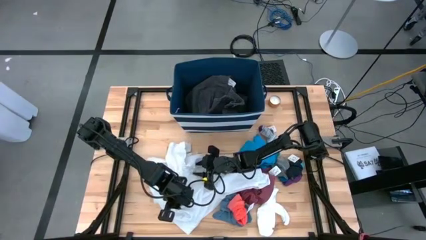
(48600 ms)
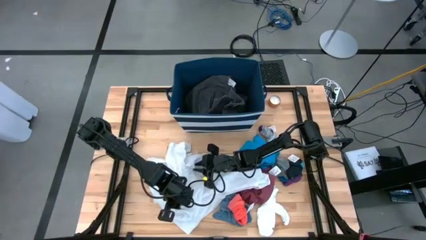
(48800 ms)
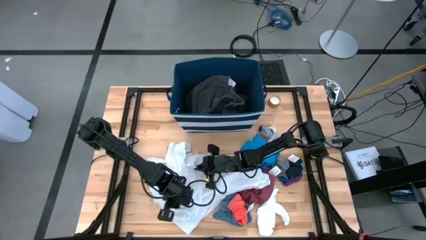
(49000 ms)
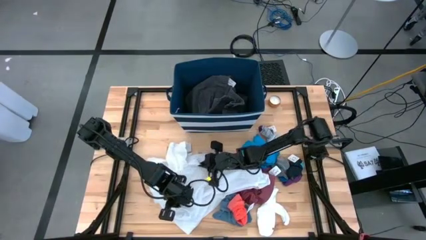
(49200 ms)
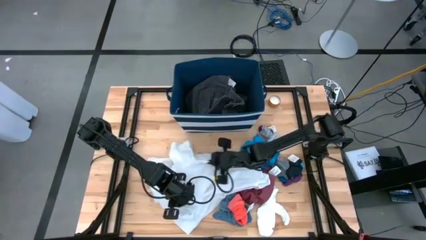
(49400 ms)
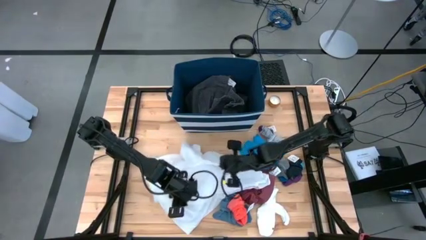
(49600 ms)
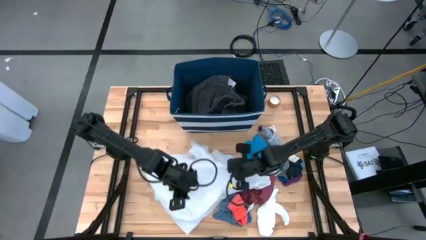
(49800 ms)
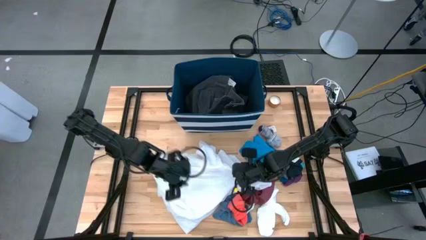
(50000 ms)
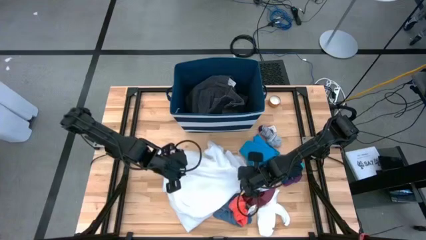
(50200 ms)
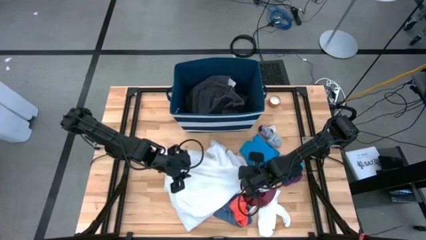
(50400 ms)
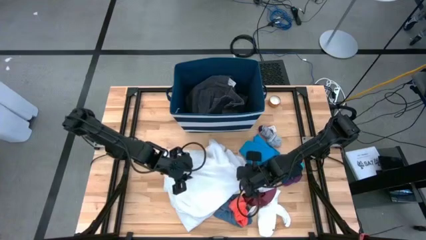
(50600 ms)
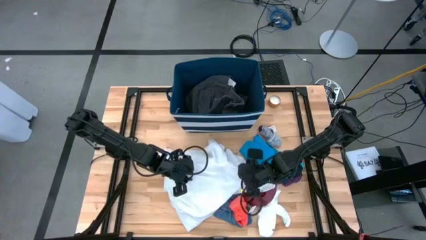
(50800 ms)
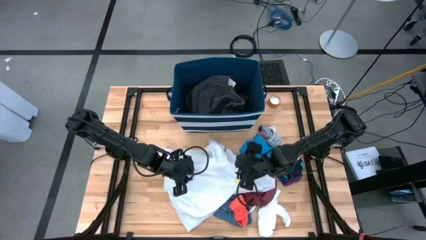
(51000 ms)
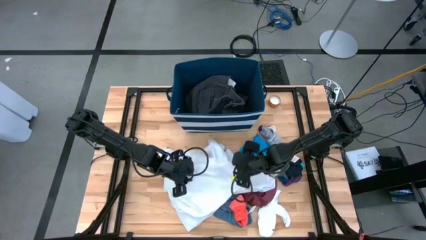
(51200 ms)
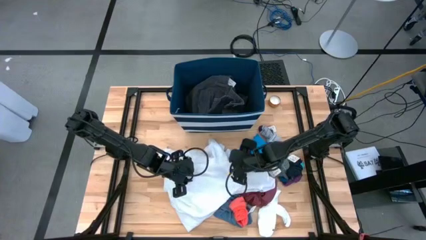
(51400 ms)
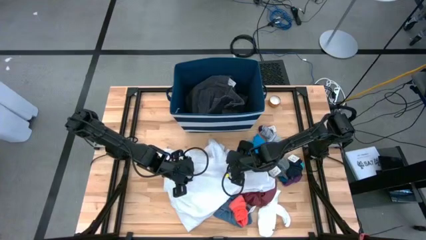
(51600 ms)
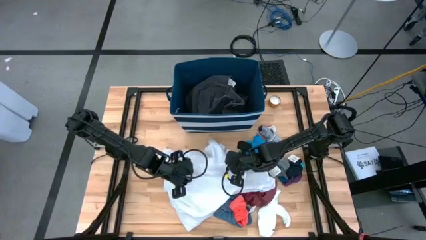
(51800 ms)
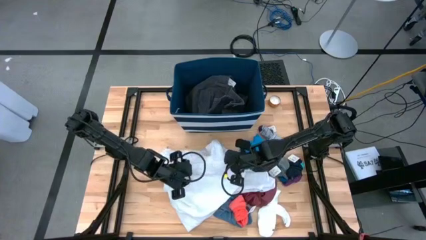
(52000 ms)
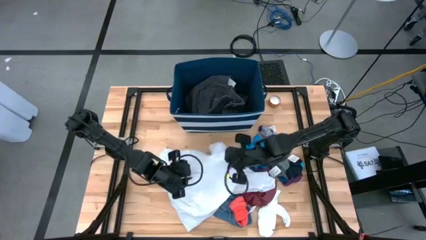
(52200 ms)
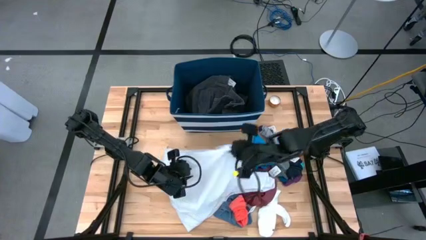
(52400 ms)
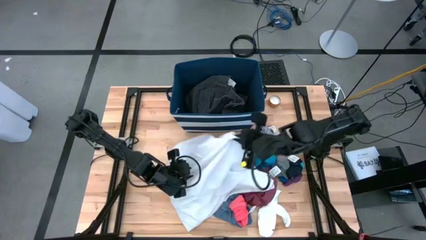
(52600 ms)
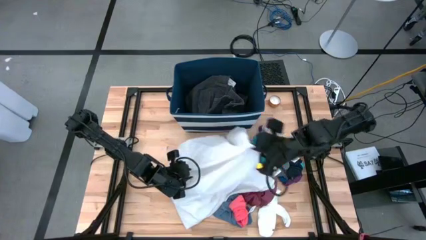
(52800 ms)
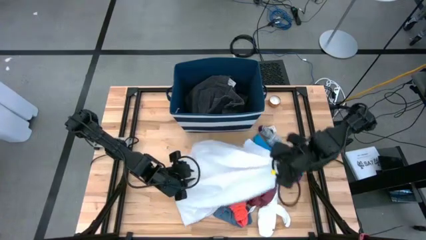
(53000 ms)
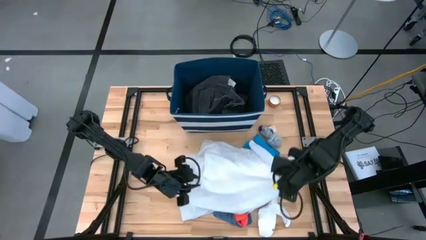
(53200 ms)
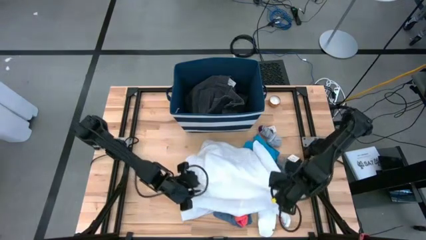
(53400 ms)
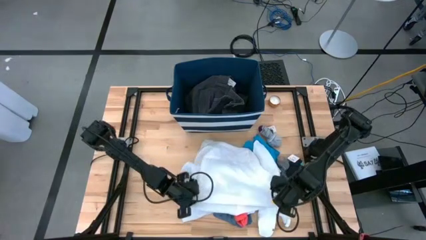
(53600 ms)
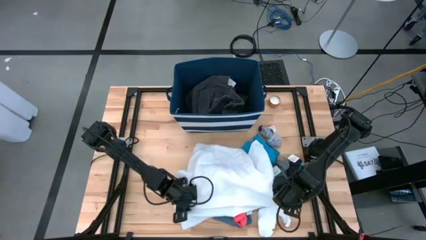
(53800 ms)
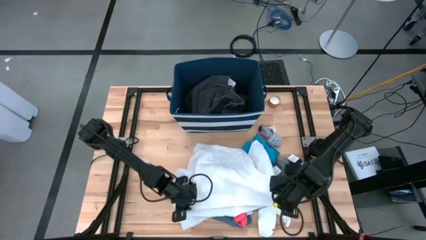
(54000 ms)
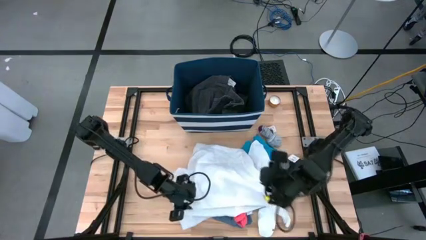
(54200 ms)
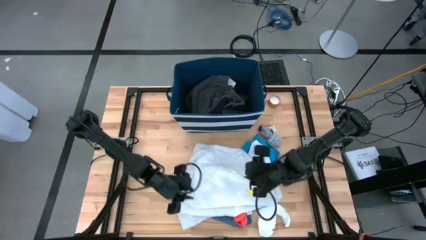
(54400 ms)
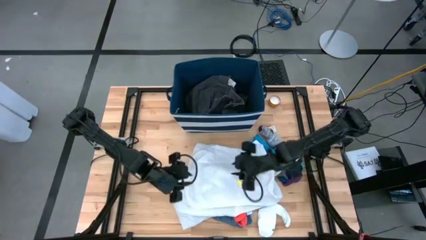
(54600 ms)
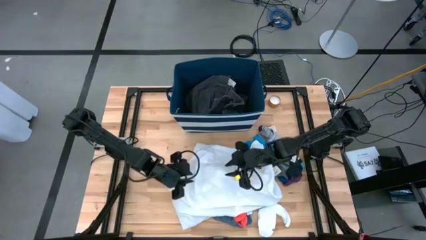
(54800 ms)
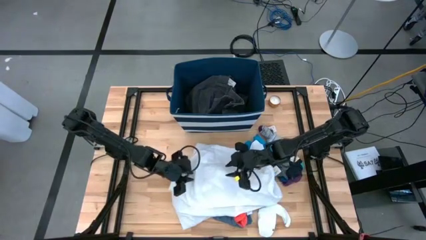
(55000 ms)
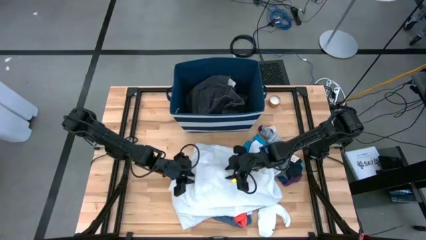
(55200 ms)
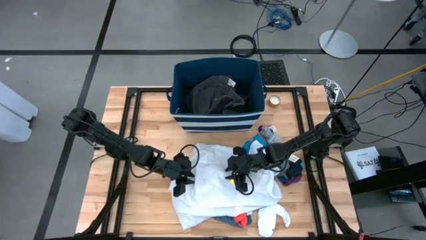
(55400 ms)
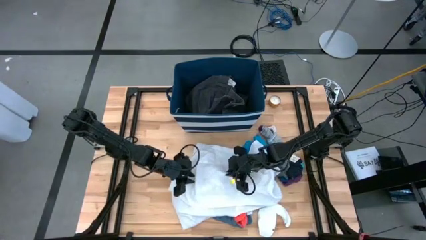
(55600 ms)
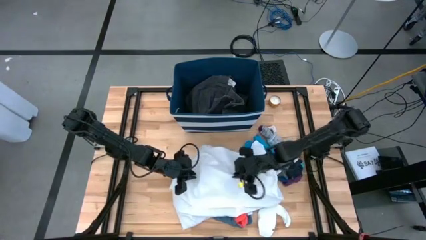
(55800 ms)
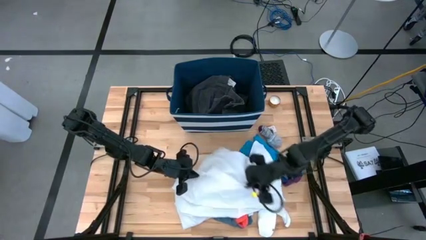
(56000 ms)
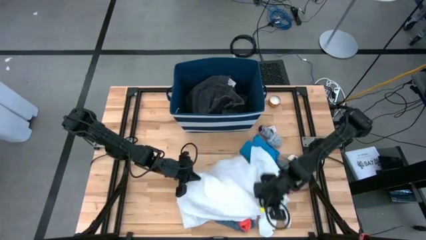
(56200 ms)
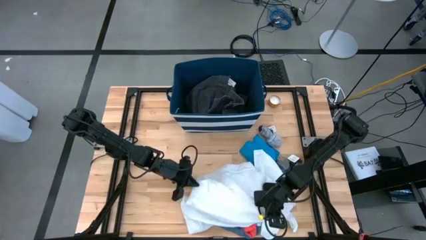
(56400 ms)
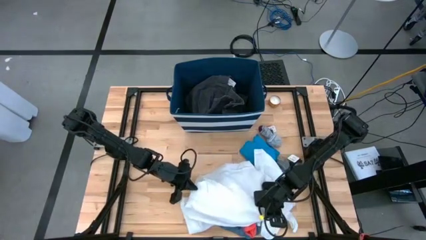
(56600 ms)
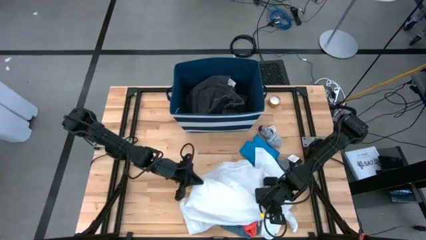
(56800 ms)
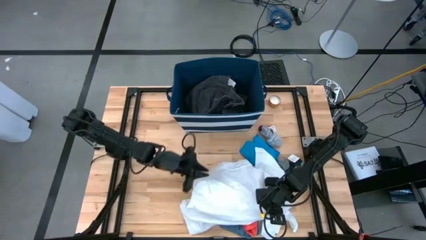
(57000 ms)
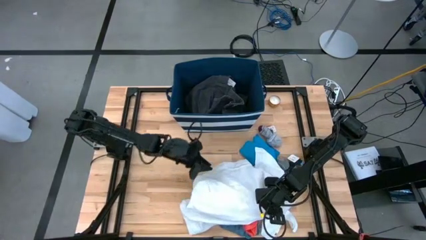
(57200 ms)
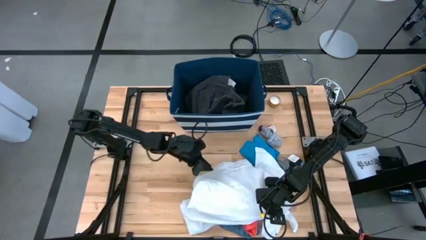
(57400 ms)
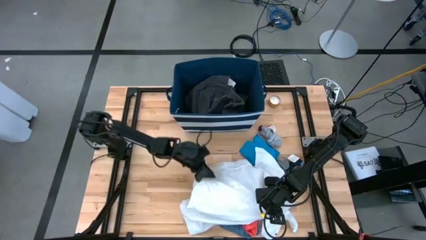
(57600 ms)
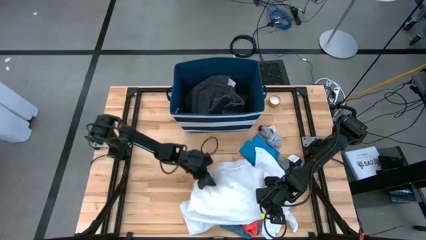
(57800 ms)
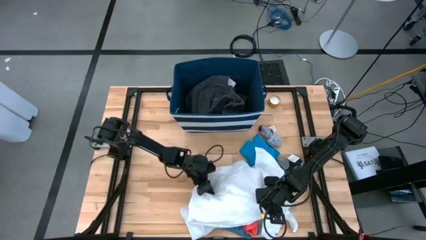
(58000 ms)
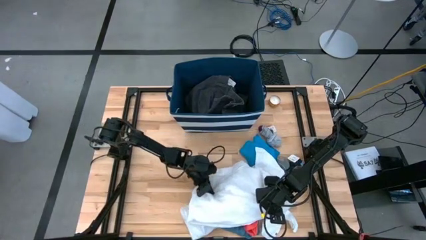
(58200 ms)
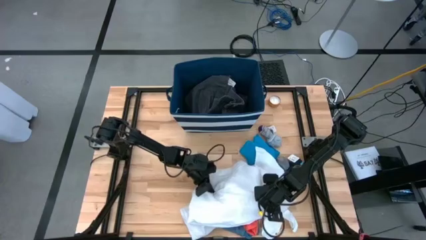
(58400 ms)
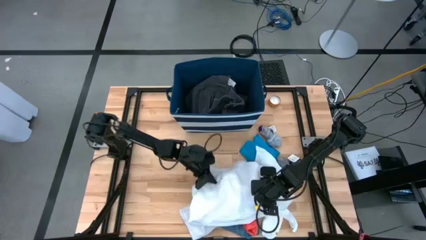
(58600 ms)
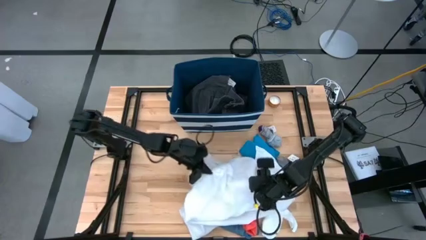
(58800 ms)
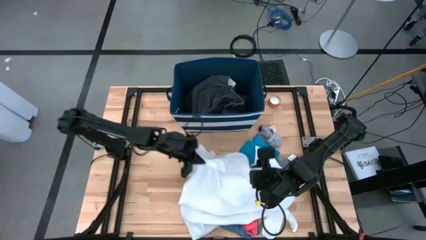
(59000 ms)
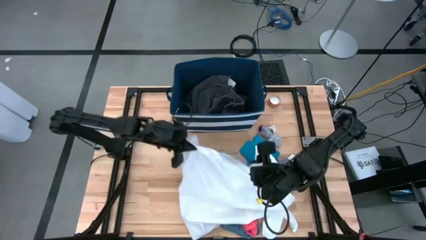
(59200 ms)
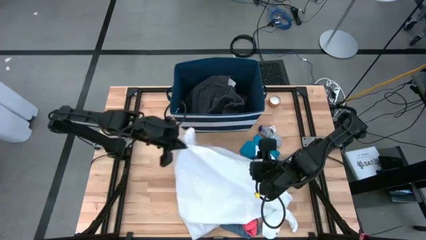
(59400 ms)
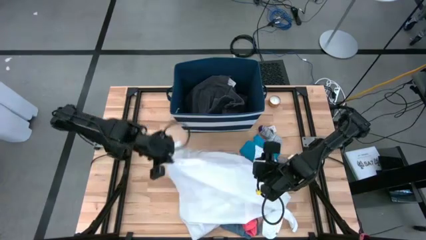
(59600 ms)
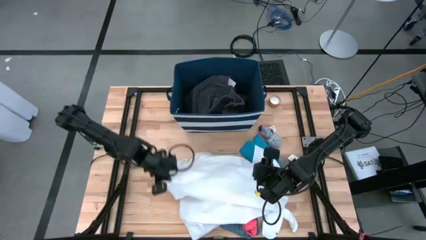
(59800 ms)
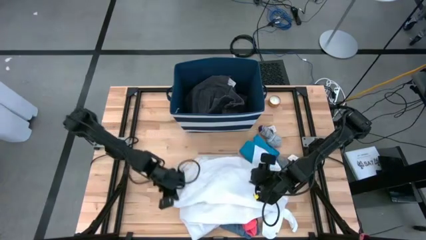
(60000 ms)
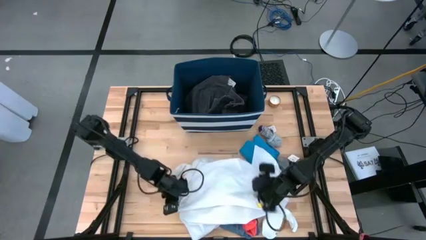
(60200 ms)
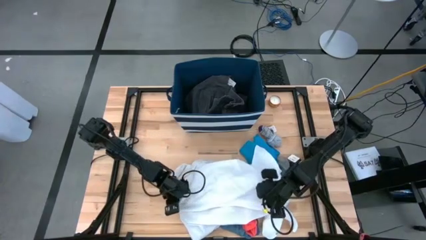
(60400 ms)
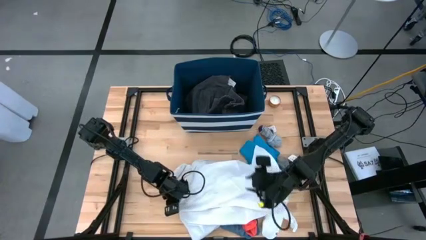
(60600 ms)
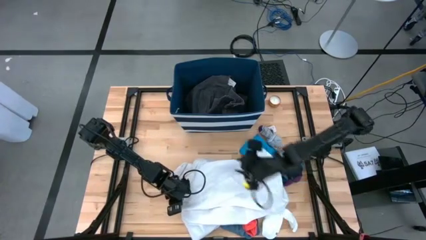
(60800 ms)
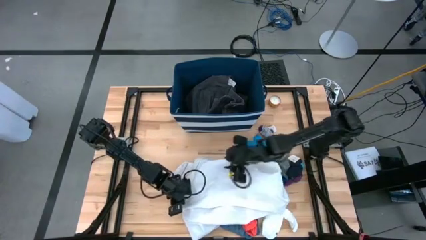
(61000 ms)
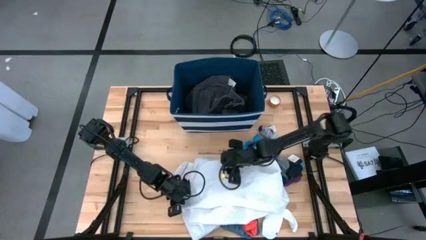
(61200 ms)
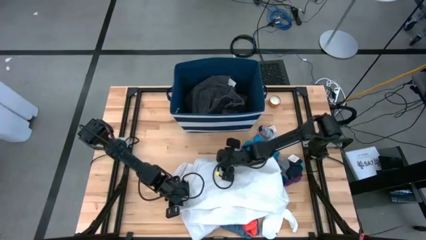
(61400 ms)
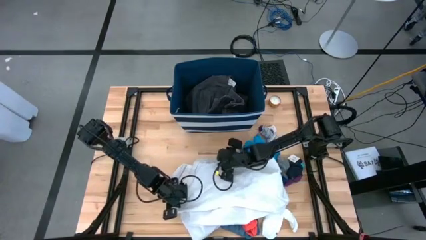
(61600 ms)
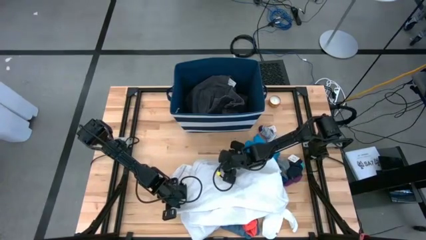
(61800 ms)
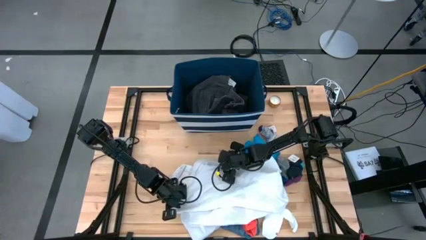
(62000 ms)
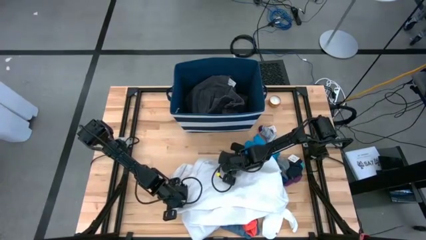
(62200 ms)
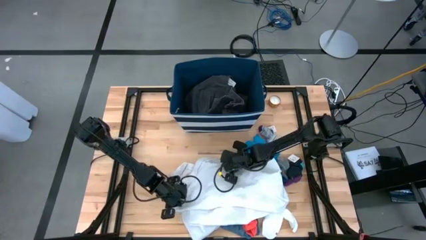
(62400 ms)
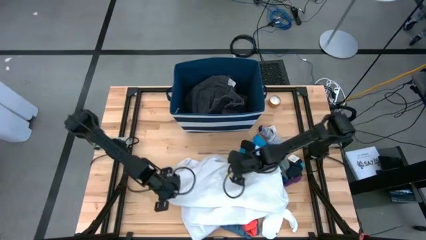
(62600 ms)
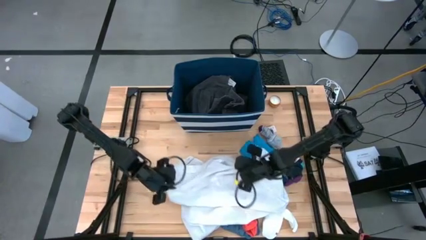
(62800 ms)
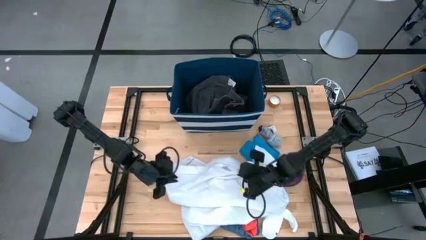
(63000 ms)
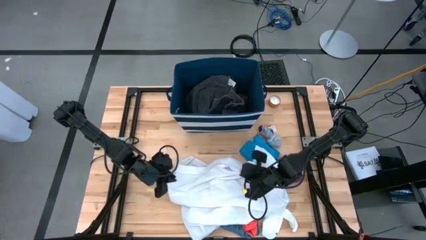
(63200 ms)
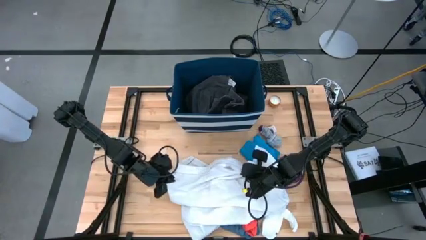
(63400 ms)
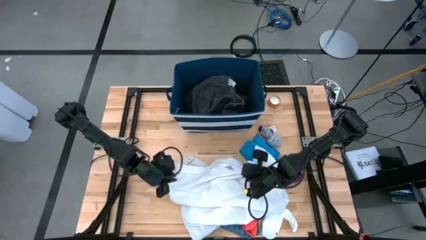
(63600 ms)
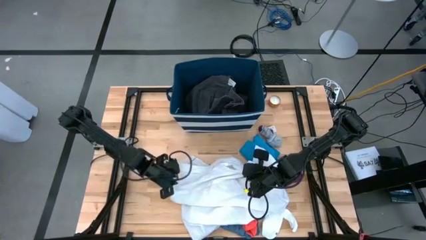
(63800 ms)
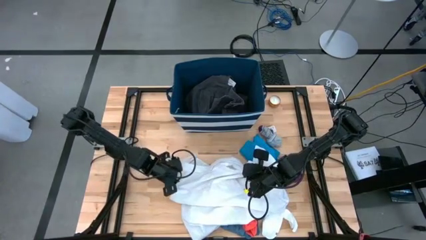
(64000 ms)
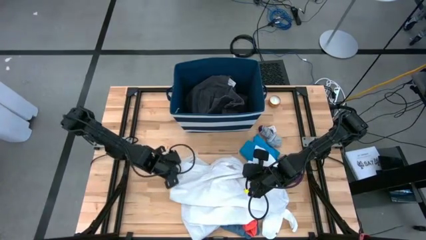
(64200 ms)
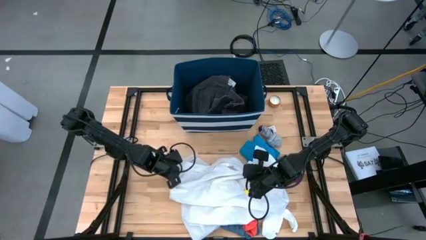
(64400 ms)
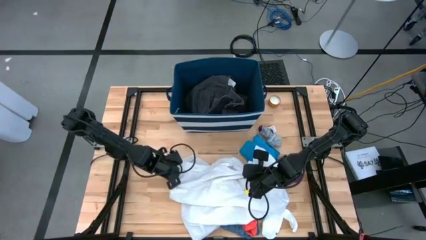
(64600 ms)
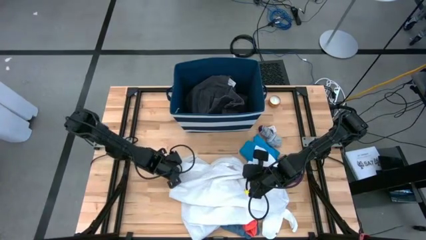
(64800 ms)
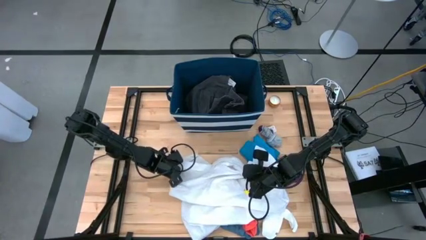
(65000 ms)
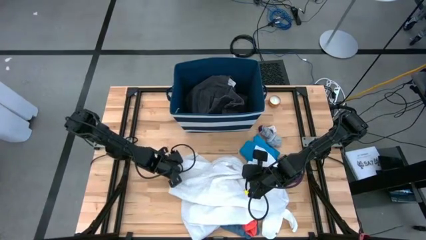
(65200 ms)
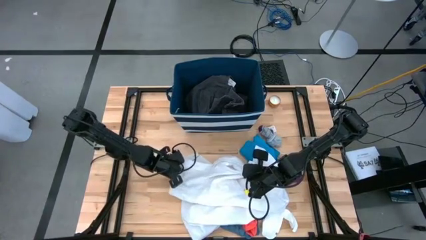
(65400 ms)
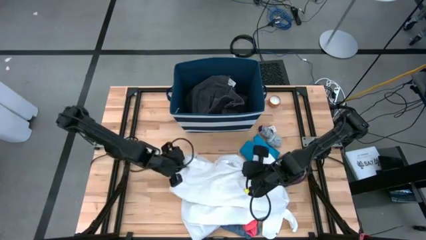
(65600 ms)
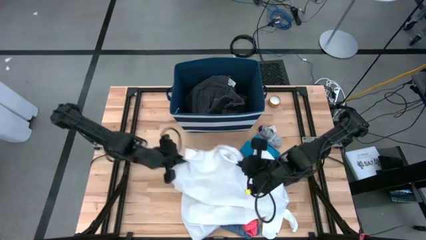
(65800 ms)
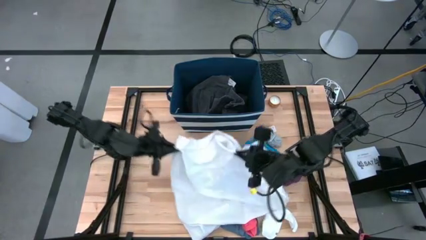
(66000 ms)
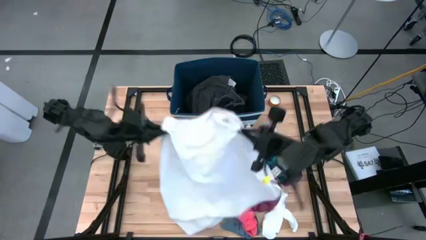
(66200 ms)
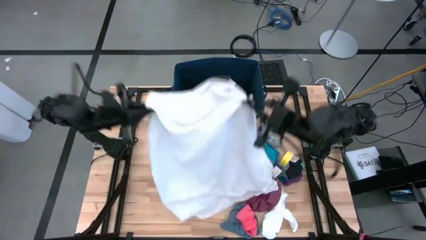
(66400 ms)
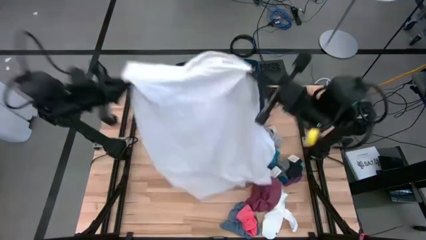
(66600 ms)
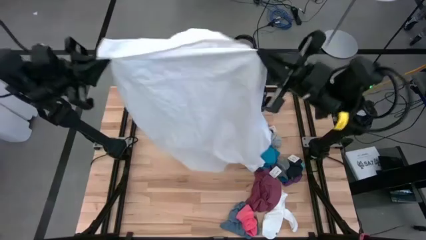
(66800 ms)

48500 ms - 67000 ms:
Task: Sort clothes
Put the white polo shirt into the blue laundry organizer
